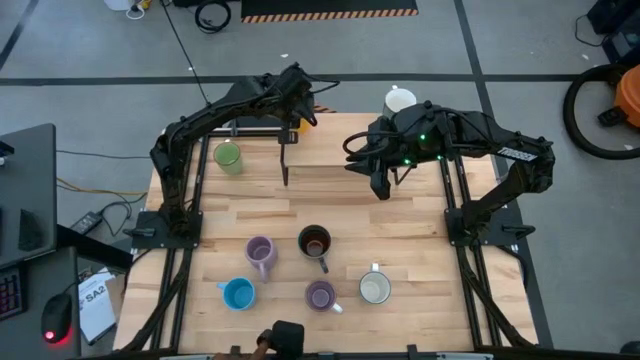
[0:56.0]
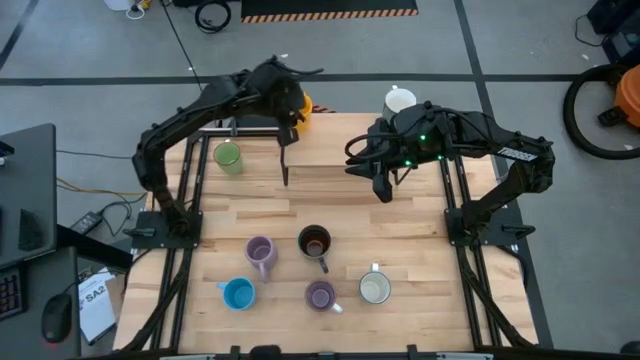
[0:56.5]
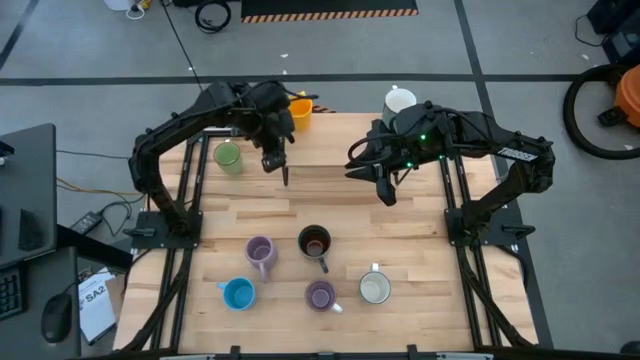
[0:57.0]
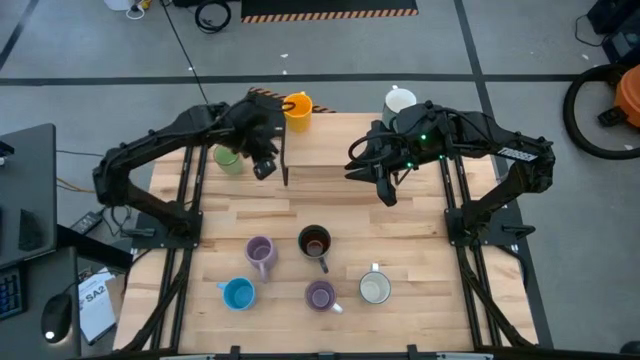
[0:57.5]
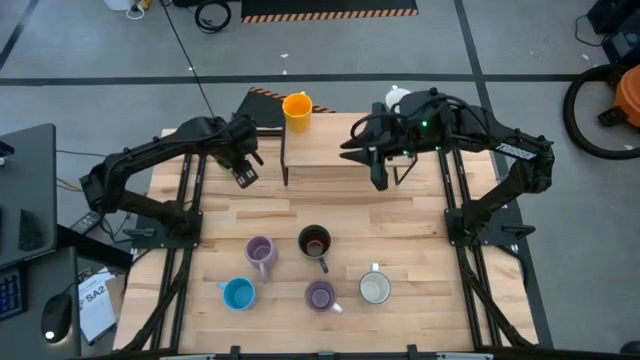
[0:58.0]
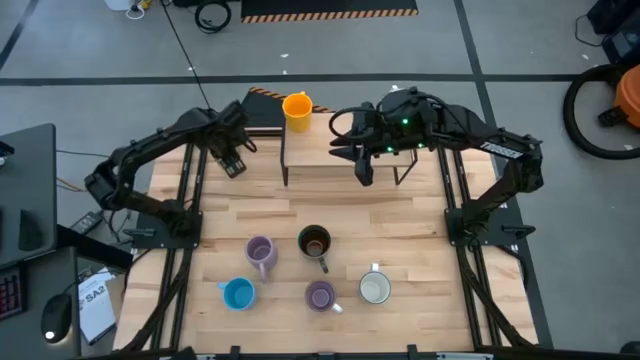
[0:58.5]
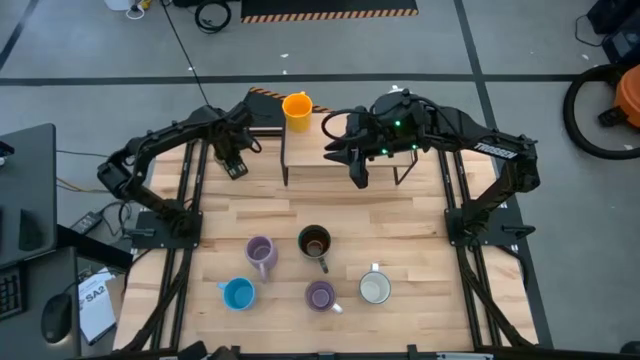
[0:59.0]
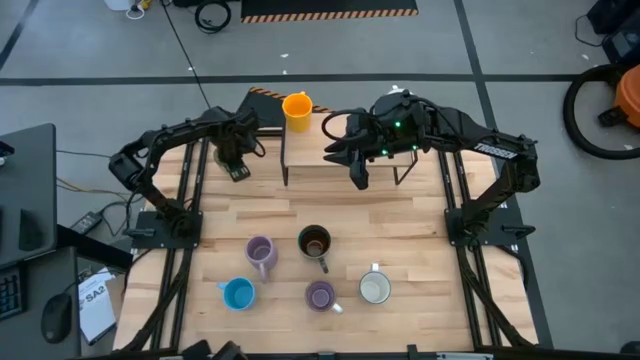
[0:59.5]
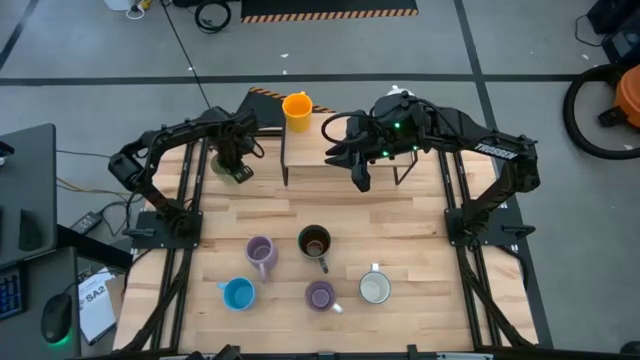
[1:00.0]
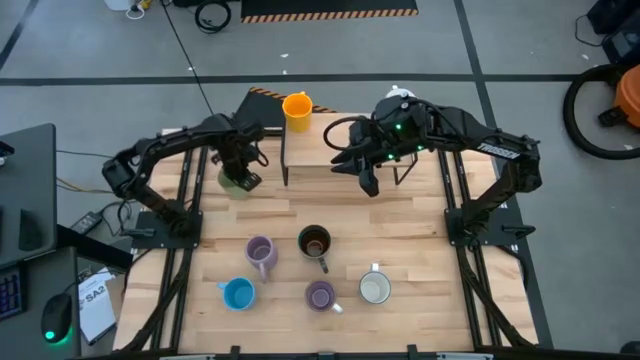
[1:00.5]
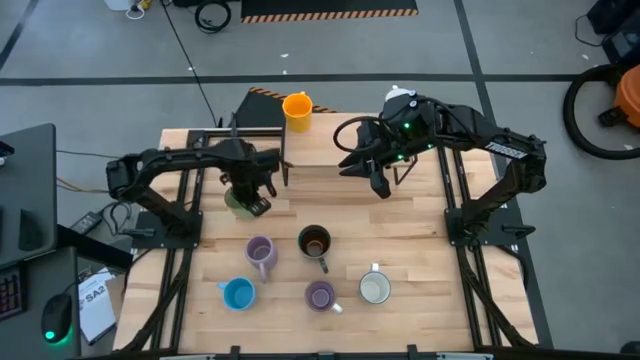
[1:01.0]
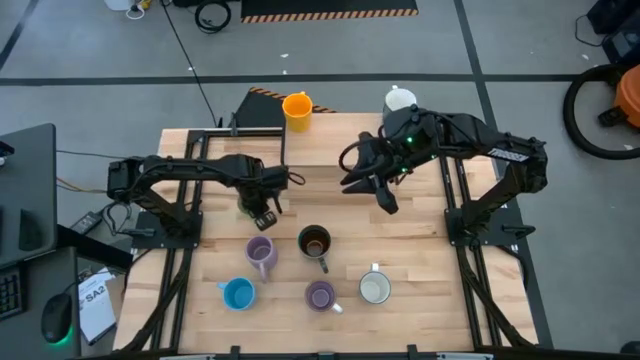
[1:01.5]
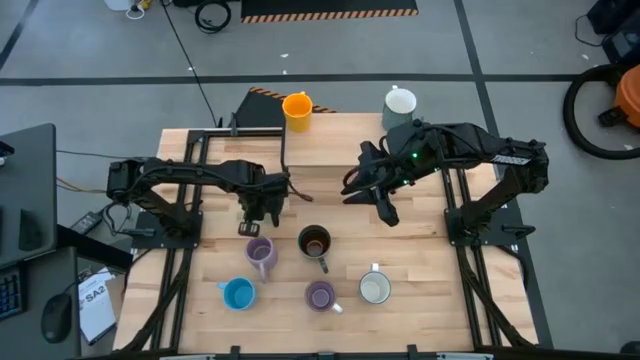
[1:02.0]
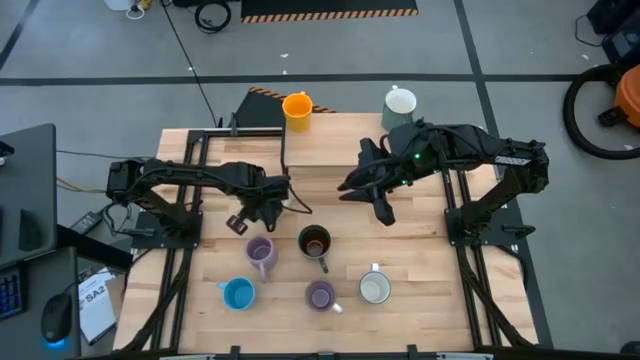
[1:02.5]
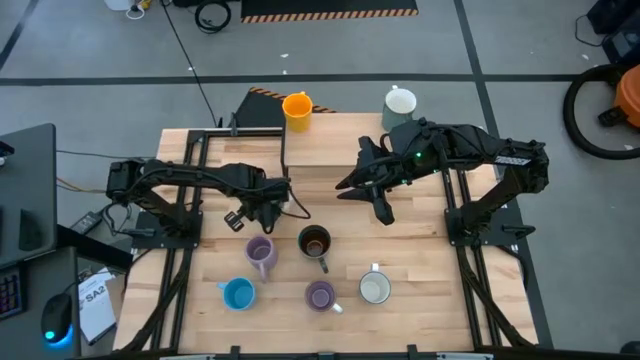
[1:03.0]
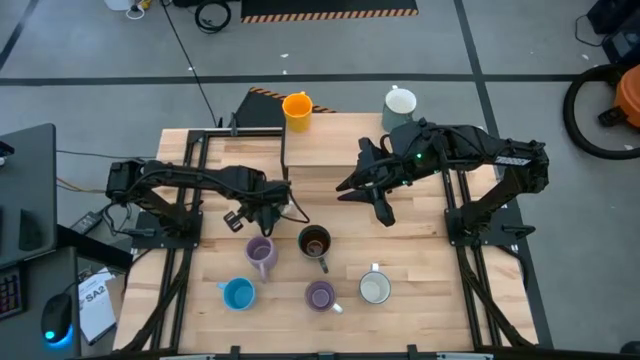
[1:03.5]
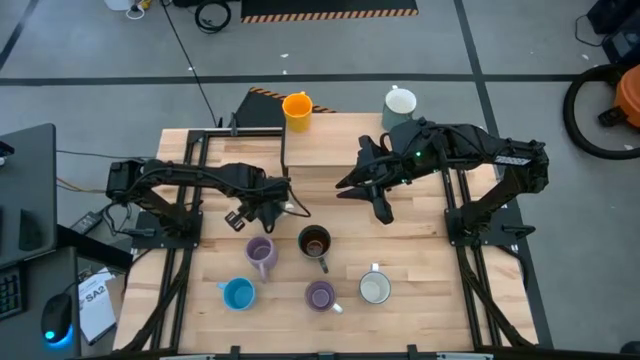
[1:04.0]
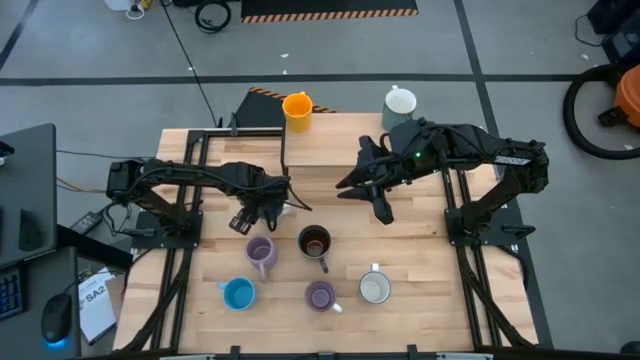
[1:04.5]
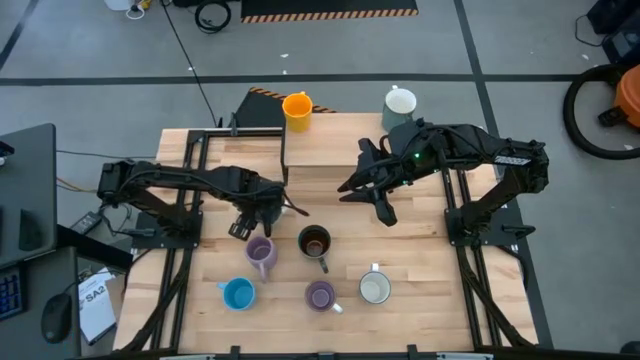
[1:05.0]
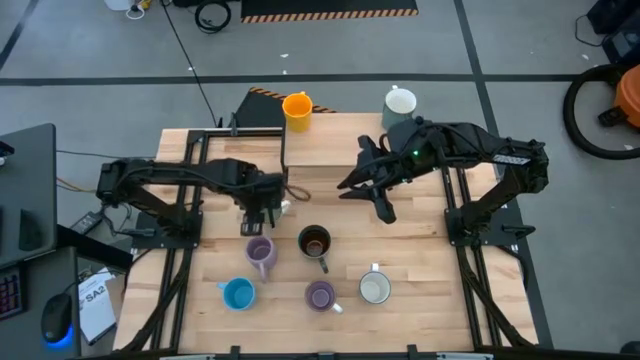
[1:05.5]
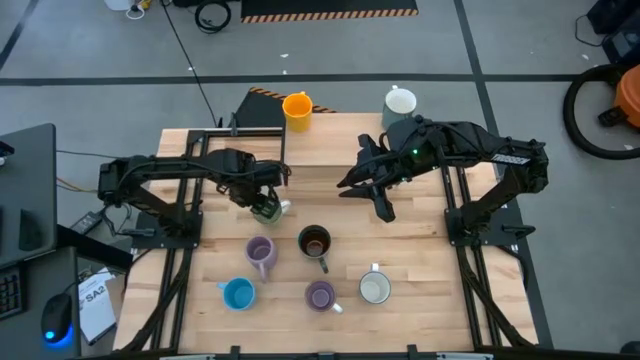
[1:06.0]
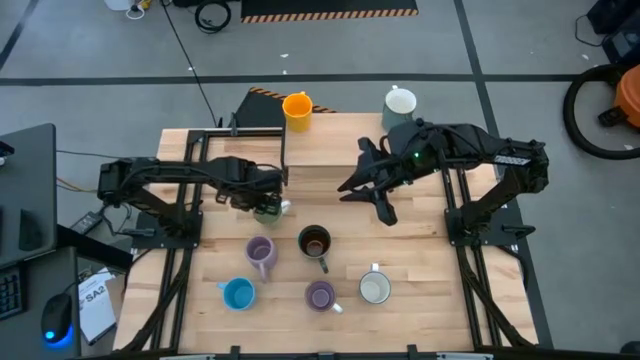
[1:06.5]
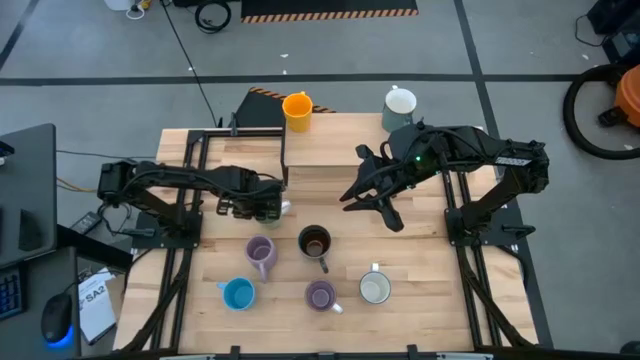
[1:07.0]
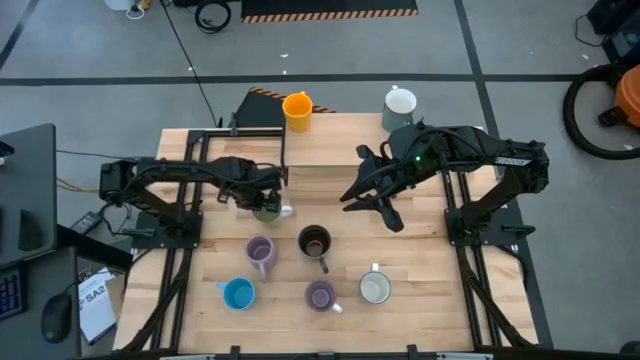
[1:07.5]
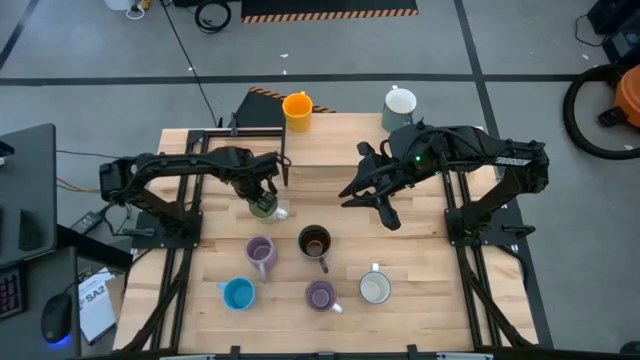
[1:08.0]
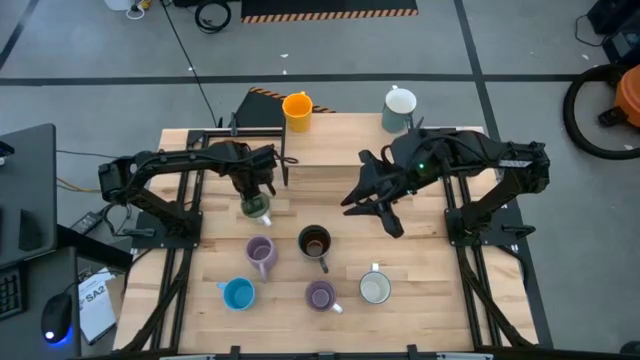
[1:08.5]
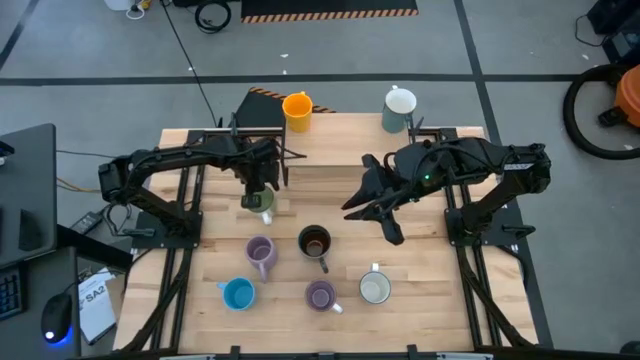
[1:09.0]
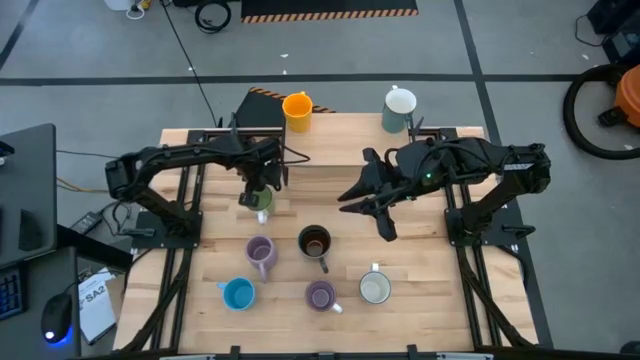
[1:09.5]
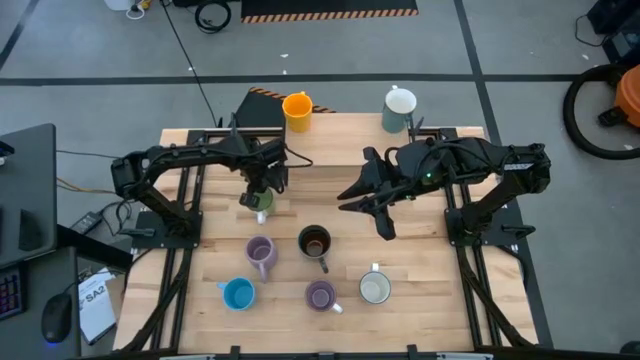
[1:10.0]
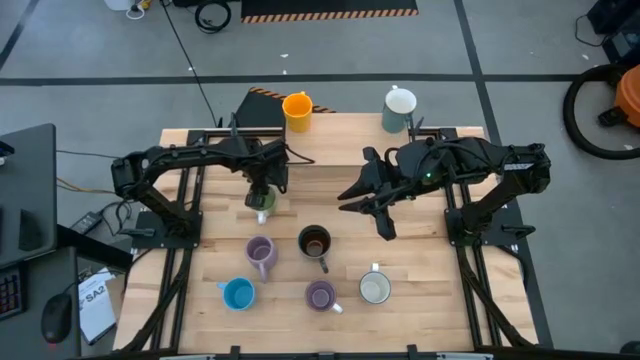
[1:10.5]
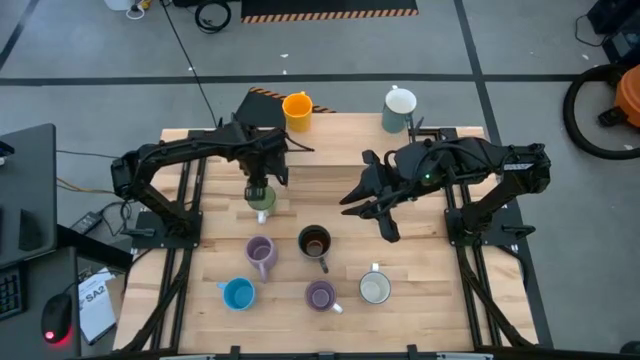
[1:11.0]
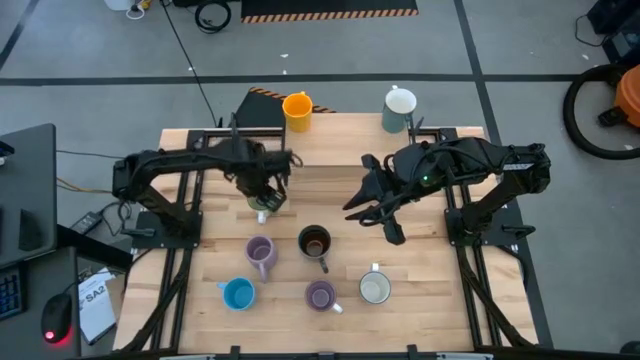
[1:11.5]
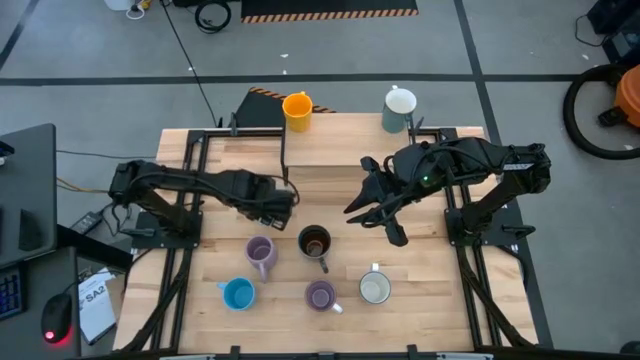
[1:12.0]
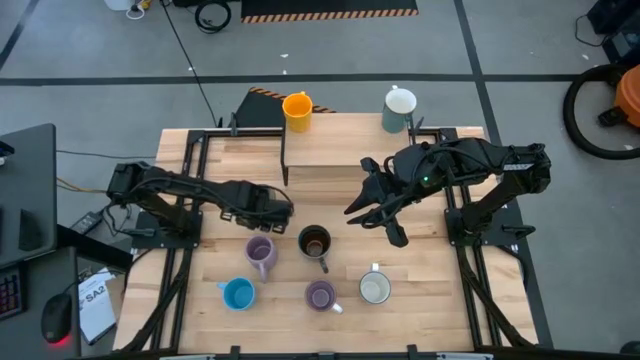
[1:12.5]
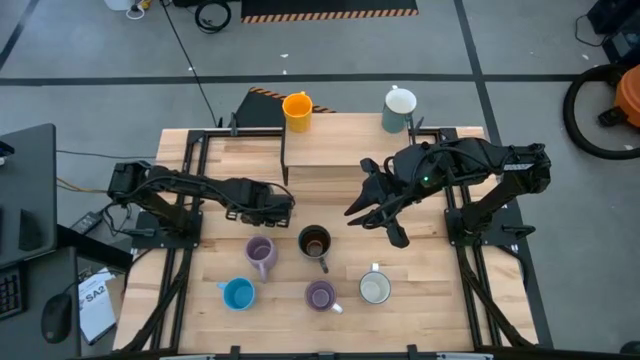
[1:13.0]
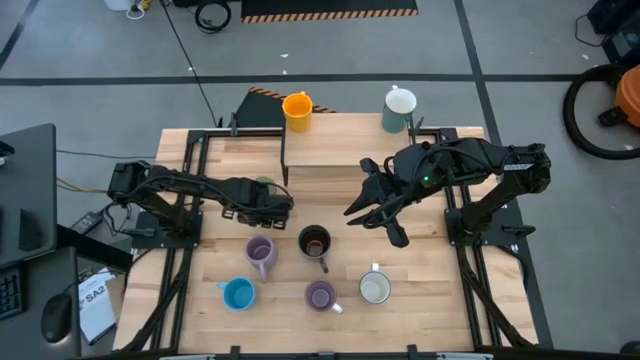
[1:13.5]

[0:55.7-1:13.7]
Task: Place coffee mugs
Put the green and white mug on the shelf

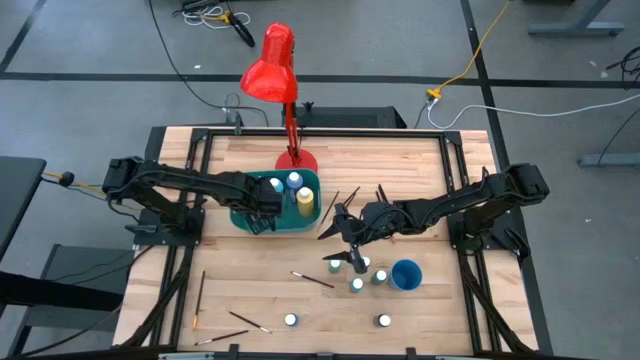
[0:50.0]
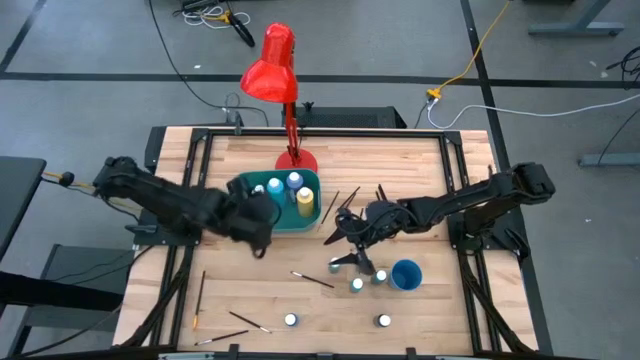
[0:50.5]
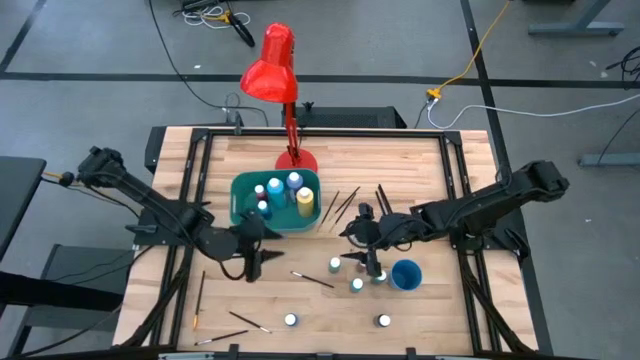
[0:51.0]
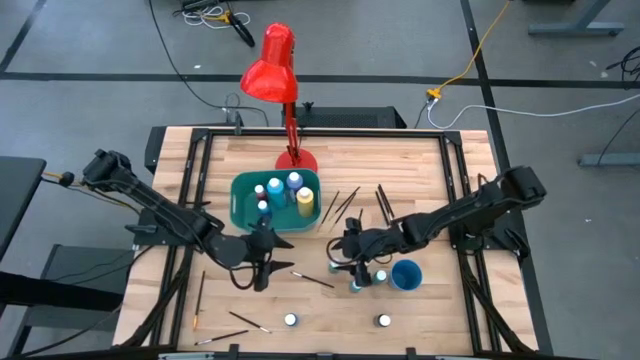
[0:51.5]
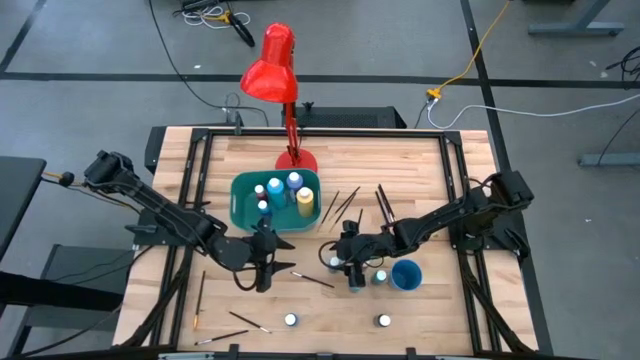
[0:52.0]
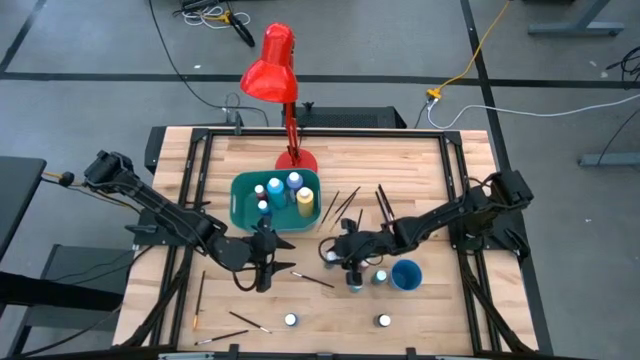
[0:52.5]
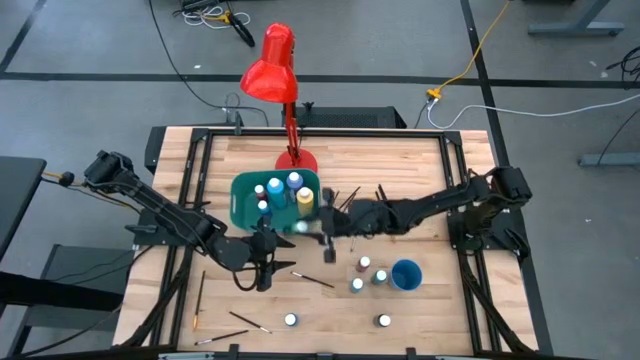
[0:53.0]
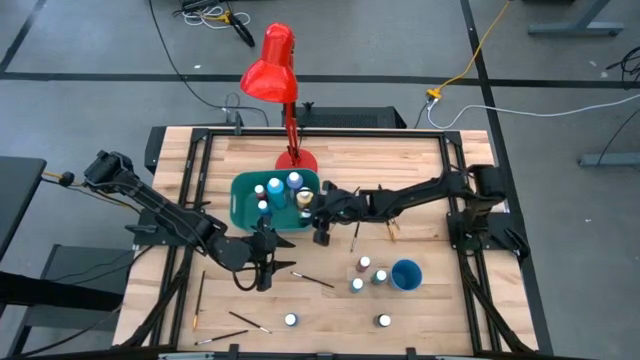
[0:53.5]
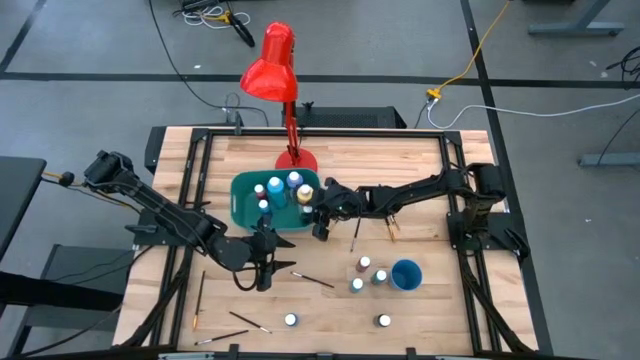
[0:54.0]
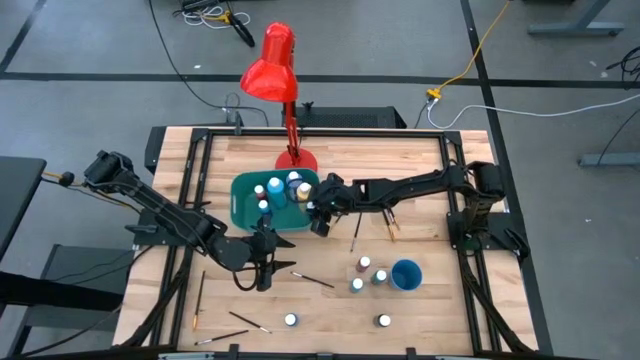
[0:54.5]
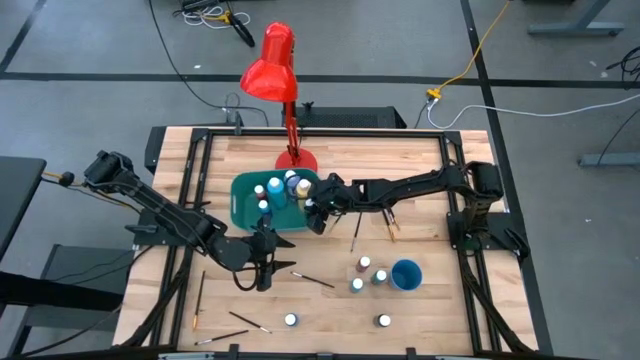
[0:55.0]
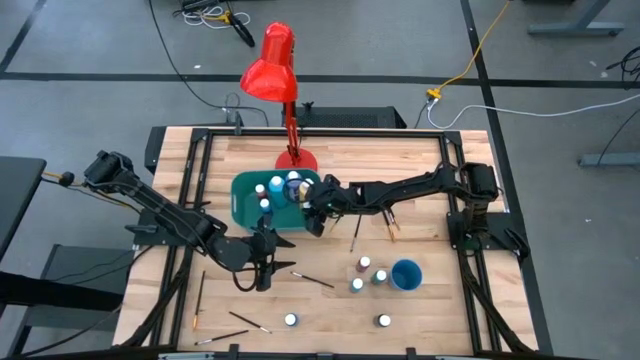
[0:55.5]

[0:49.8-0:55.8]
Task: Pick & Place Paint Supplies
Put the small light green paint bottle into the green bin
